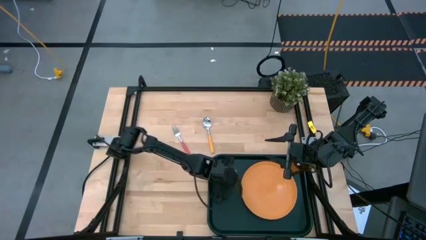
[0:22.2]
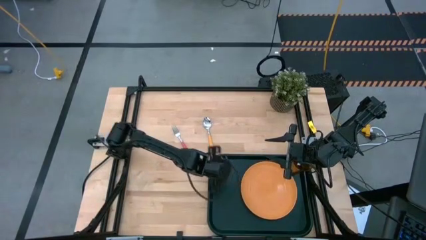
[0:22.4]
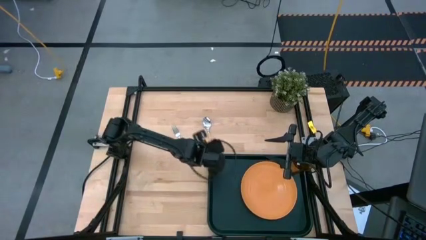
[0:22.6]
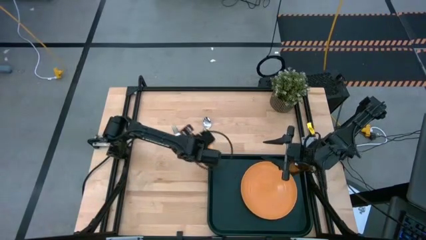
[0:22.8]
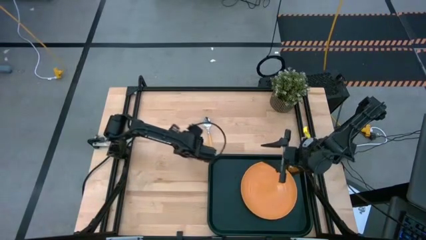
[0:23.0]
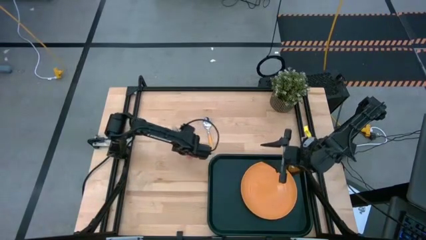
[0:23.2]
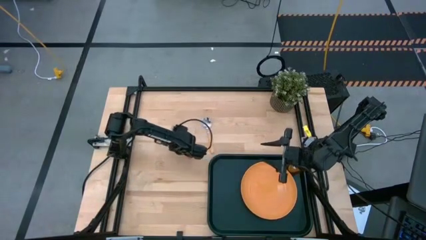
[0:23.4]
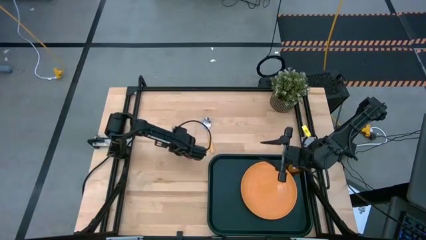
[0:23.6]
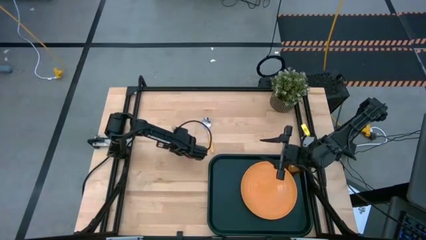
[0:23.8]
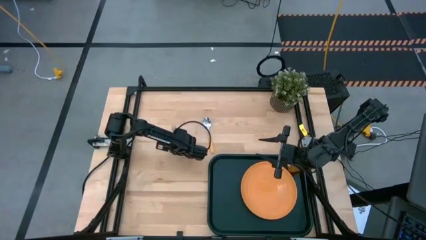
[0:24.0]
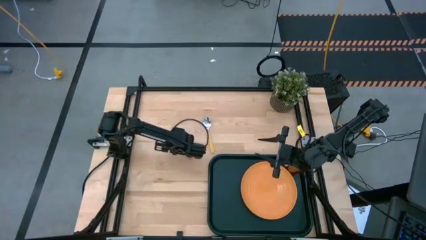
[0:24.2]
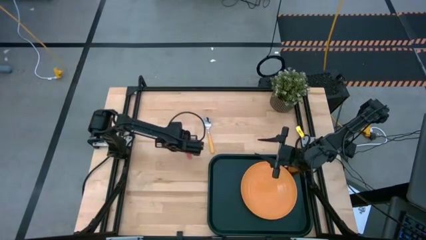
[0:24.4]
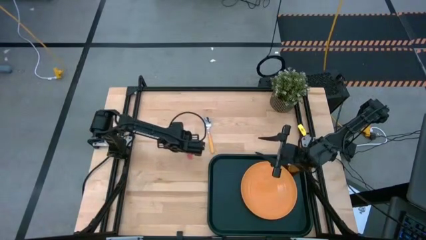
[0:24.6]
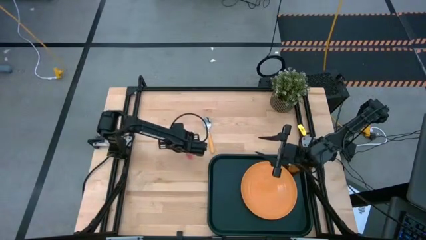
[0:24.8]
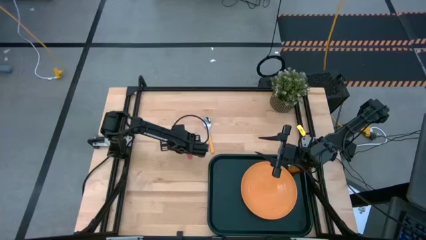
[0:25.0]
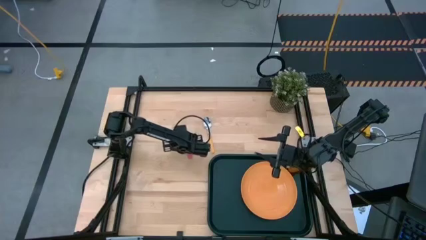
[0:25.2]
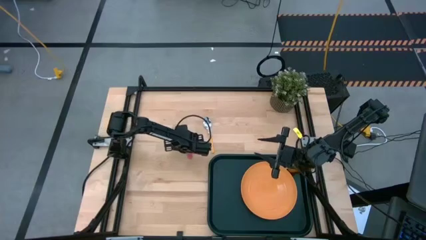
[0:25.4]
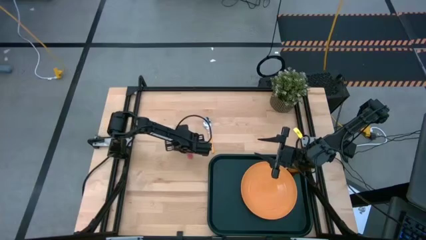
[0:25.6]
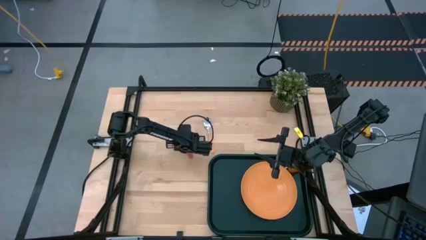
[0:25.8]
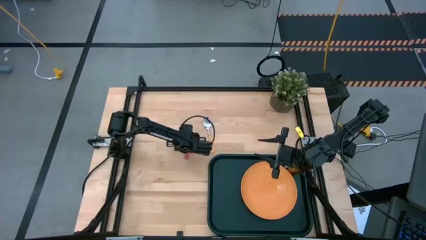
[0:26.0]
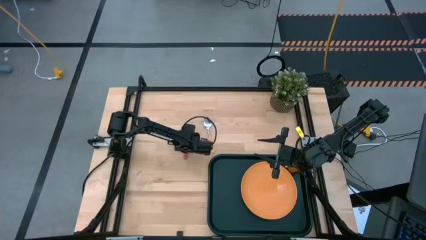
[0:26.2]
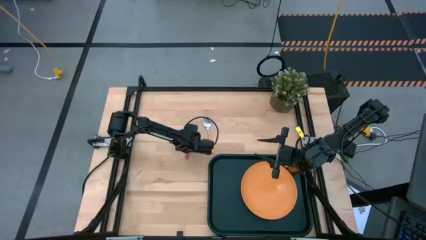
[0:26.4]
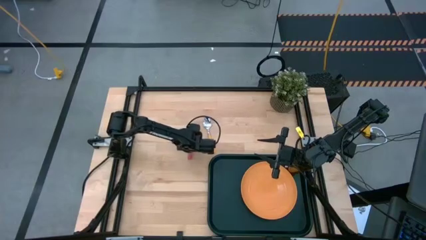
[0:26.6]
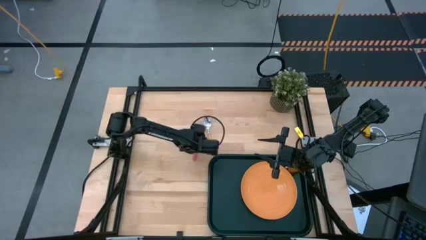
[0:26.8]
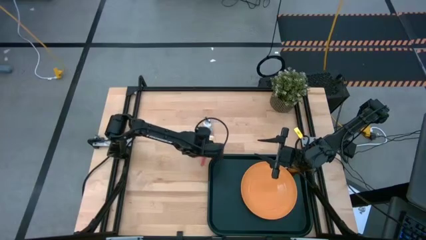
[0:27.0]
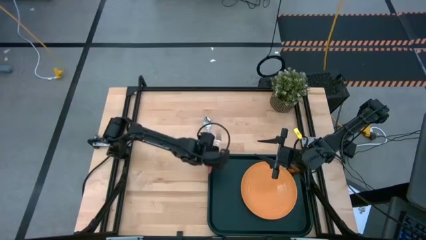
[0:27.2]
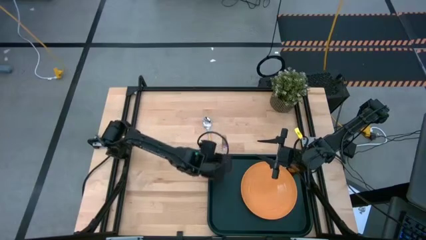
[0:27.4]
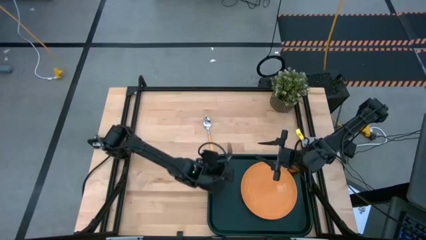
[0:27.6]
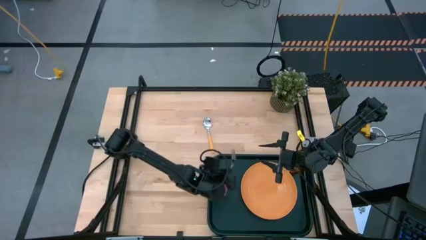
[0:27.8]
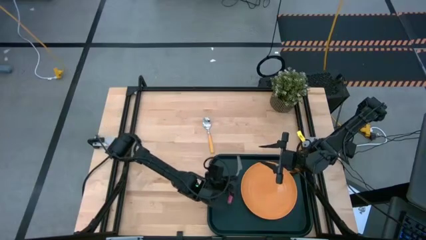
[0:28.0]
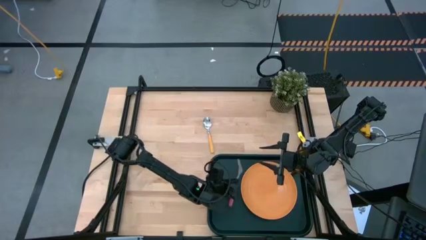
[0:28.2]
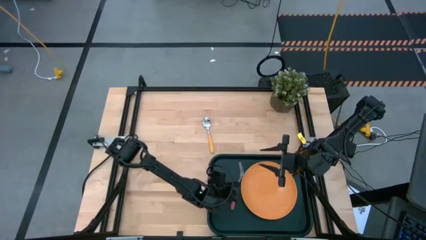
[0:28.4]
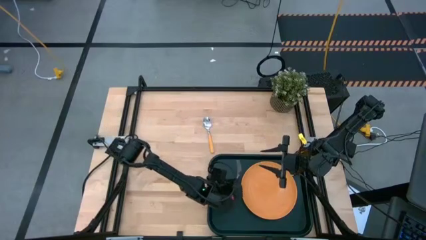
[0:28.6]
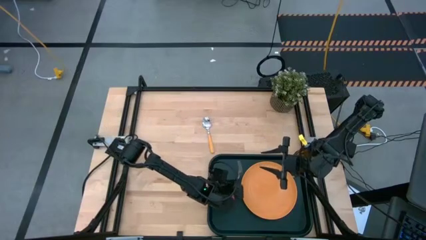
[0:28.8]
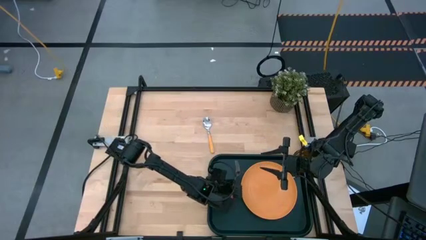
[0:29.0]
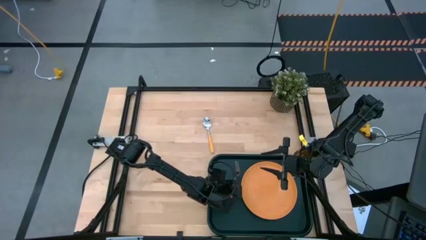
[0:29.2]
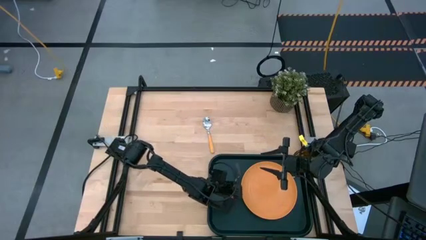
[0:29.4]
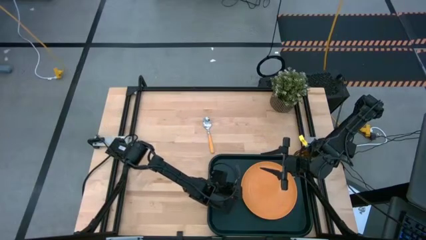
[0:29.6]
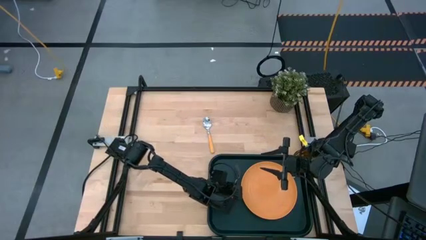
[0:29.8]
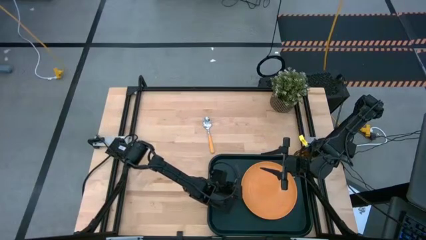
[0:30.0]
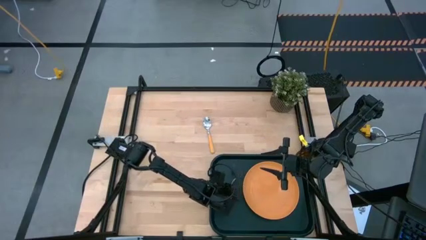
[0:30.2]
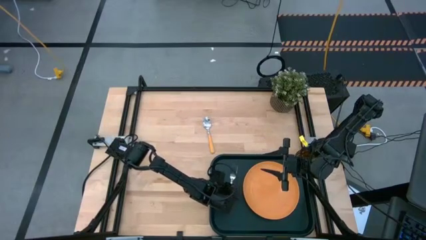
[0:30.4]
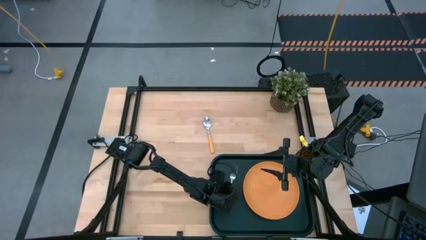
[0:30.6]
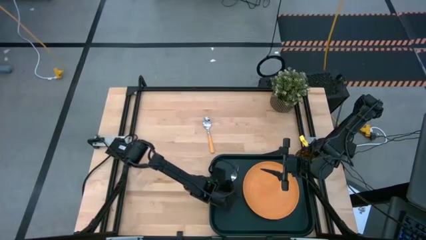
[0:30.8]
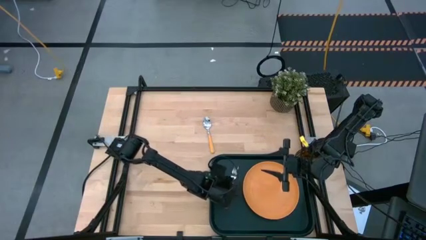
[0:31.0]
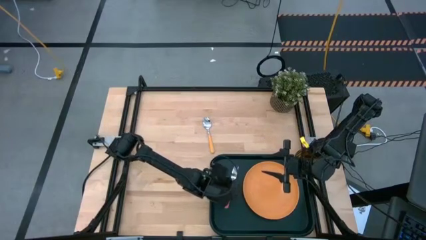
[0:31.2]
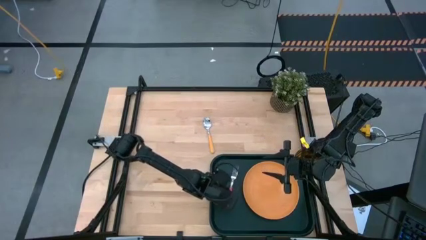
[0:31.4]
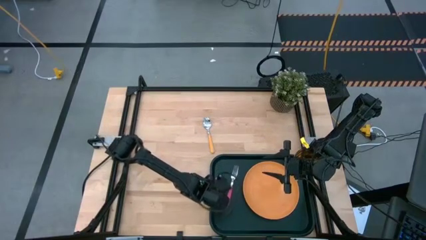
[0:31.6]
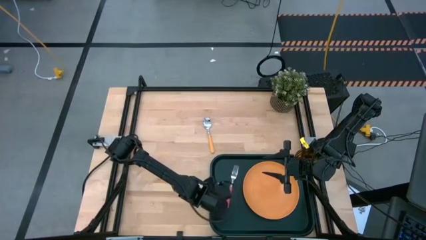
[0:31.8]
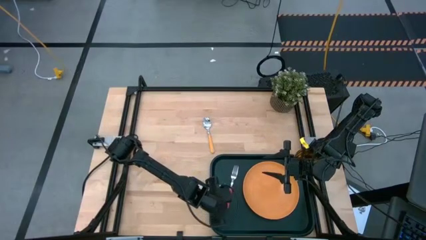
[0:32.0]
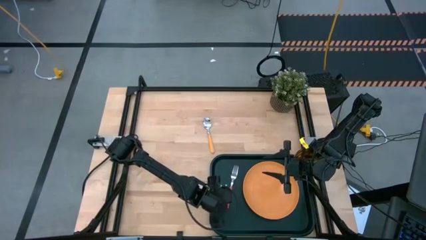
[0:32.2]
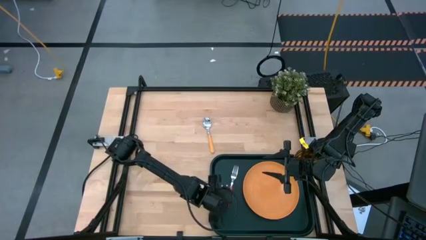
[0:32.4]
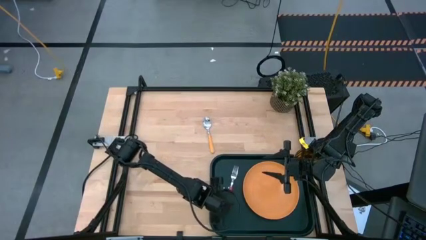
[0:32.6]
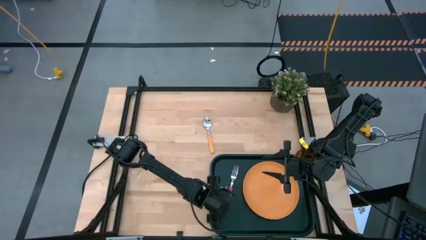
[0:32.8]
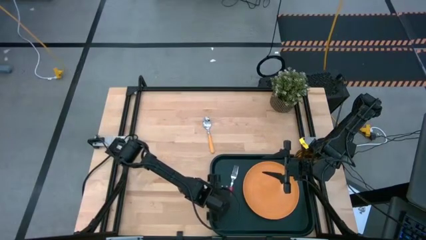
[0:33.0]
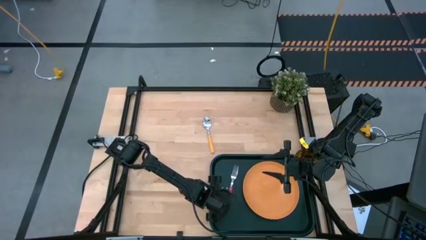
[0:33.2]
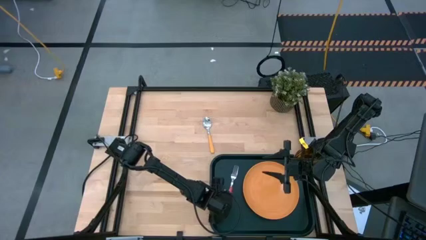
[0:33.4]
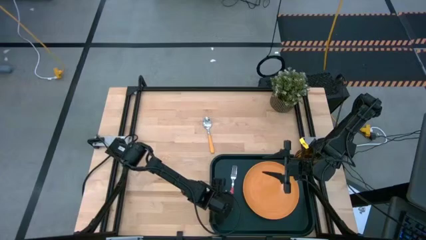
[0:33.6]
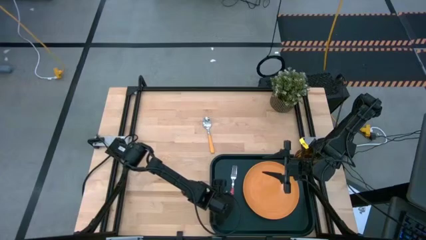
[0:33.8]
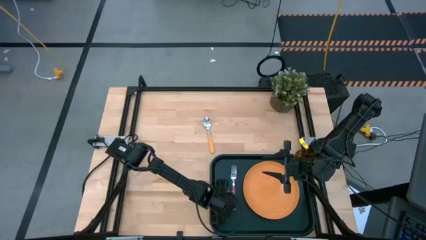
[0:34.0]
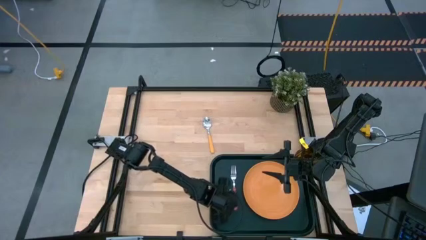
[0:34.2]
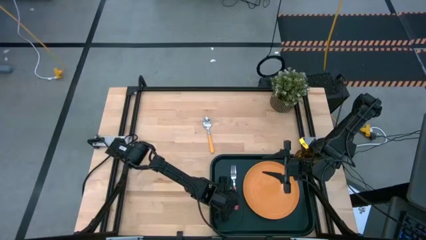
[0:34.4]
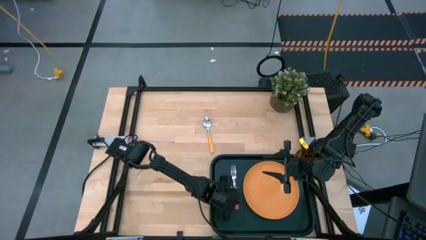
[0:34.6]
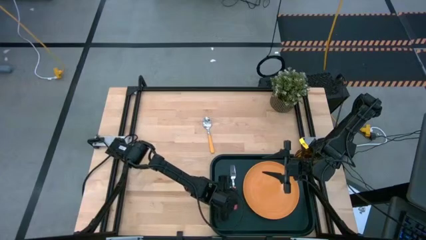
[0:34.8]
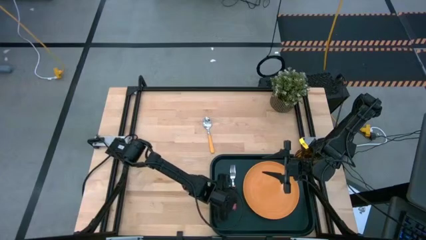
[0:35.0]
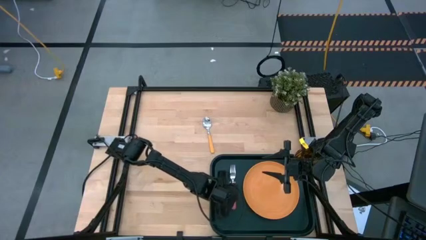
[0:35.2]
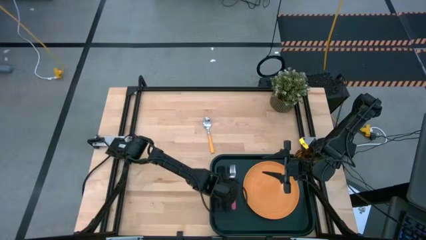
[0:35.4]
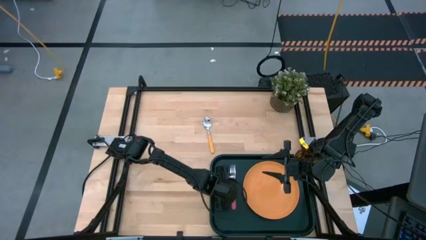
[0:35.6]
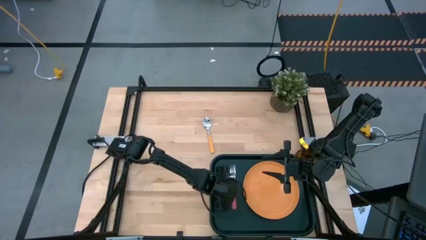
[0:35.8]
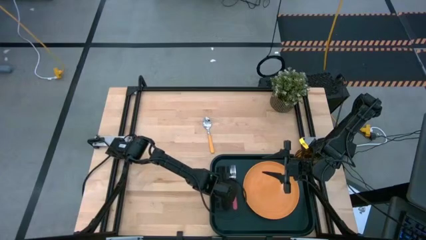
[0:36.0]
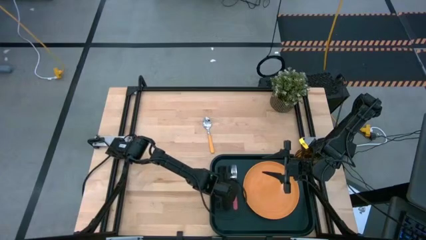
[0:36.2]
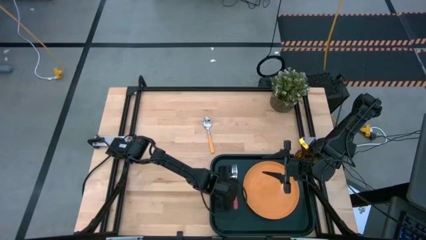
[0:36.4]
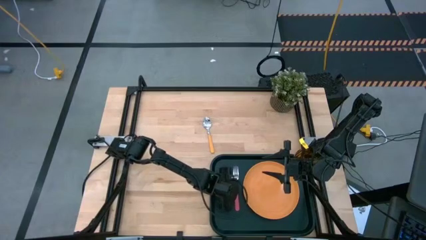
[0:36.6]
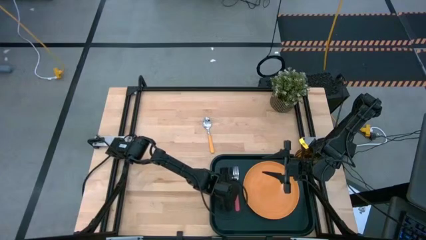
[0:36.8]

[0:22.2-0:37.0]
Task: Pick and place plate/cup/fork/spoon on tray
Put the pink fork on the left side of the orange plate

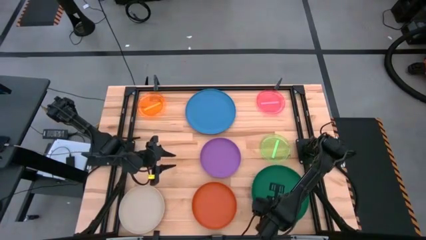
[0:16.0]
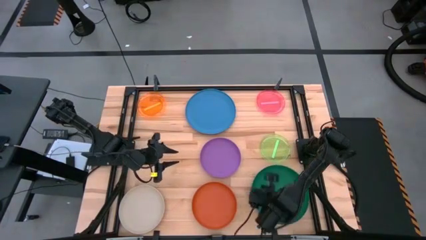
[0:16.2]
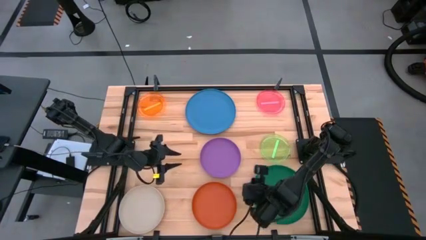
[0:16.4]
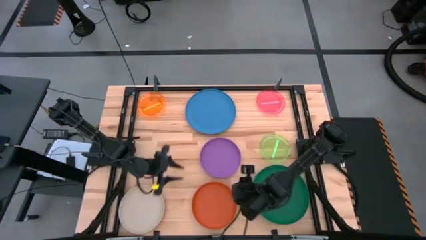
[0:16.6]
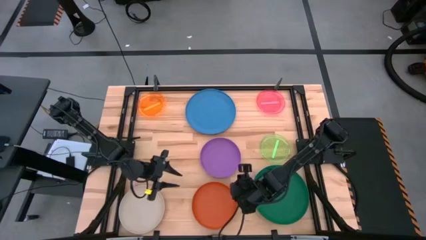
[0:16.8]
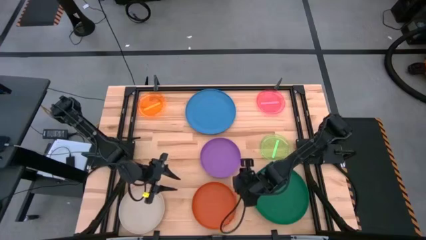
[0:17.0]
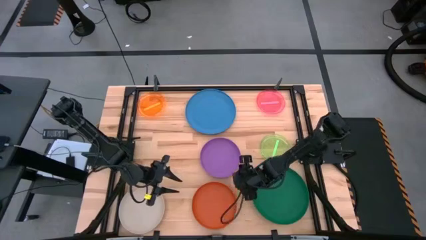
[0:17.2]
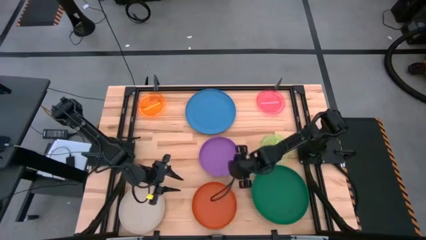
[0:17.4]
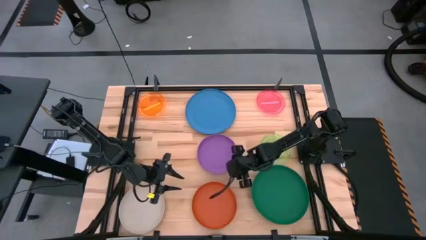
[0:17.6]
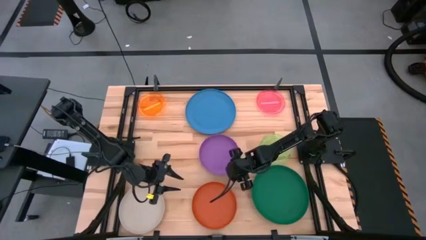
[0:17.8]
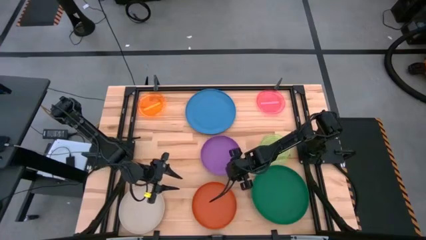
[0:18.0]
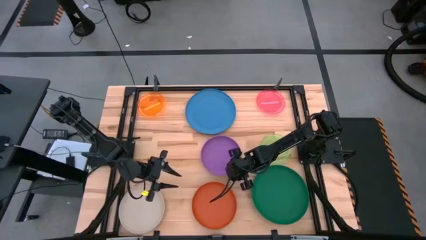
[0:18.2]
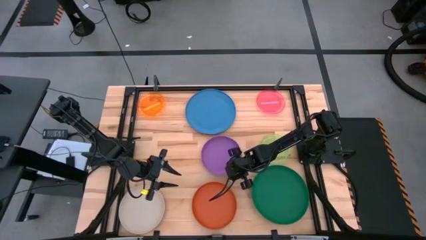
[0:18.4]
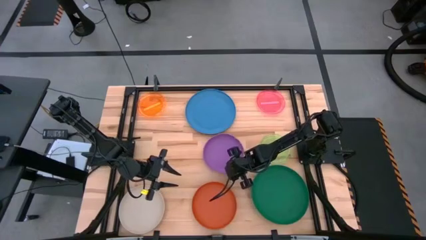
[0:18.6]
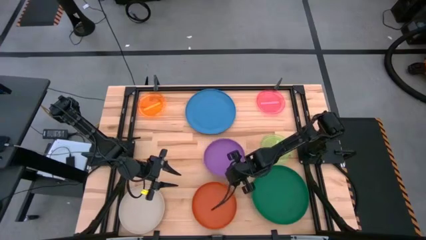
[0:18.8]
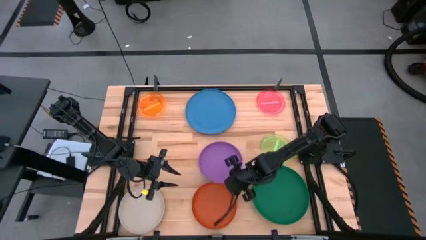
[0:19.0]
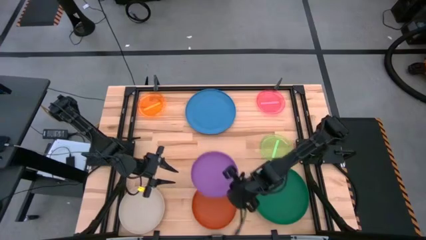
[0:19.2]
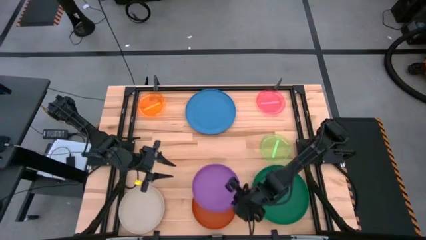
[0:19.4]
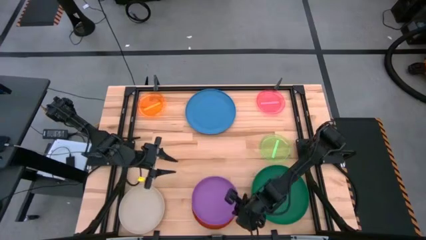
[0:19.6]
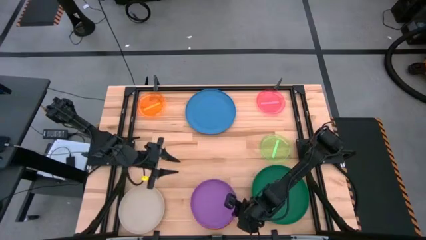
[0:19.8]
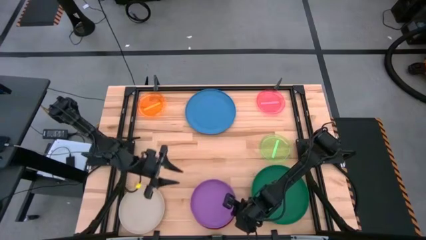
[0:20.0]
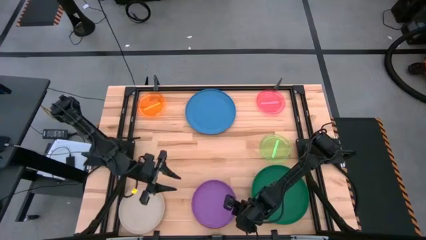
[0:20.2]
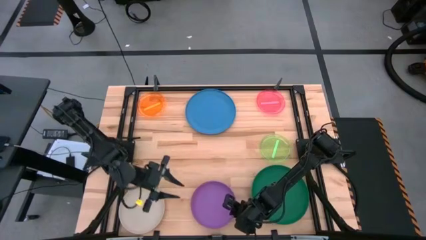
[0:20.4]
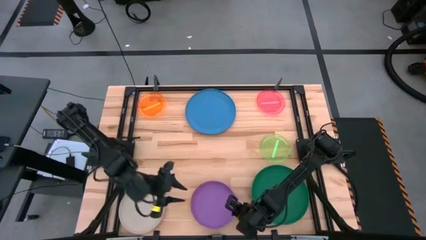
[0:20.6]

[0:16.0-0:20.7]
Task: Stack plastic plates
Stack the purple plate on top of the orange plate
